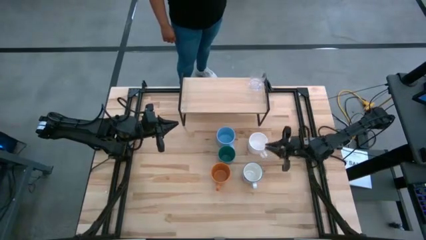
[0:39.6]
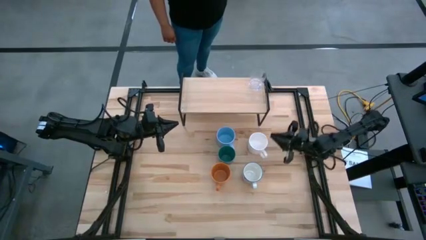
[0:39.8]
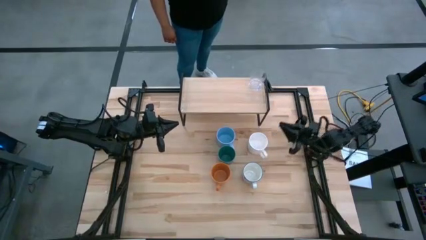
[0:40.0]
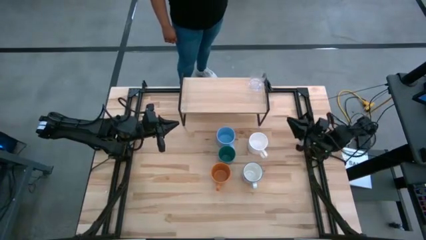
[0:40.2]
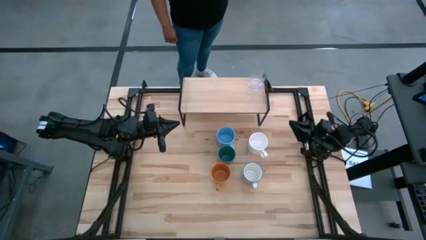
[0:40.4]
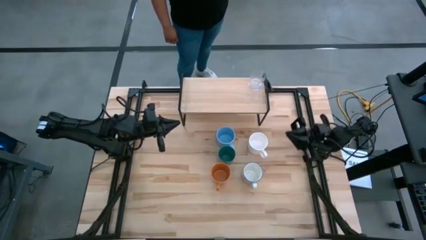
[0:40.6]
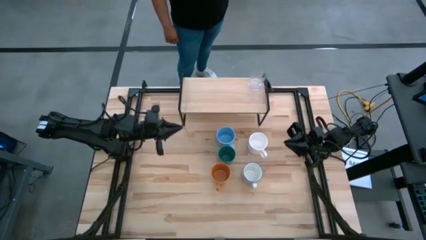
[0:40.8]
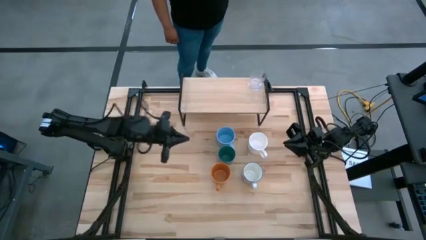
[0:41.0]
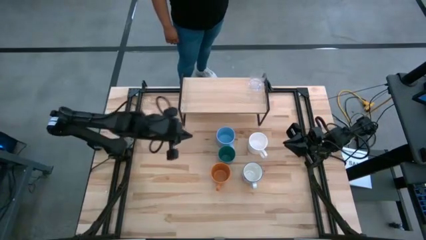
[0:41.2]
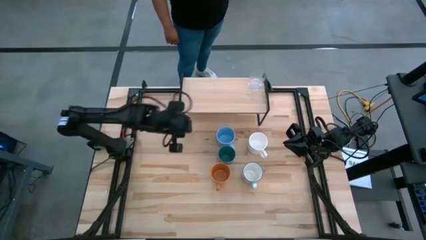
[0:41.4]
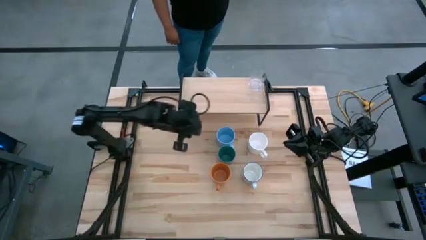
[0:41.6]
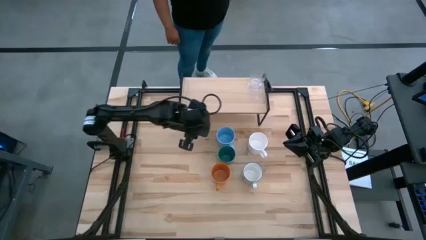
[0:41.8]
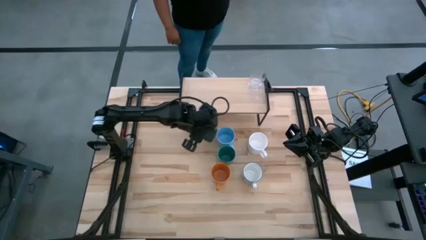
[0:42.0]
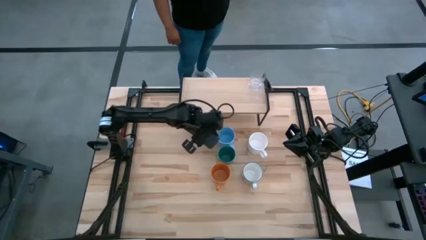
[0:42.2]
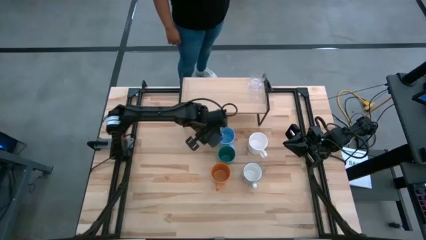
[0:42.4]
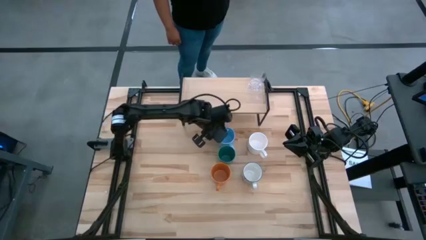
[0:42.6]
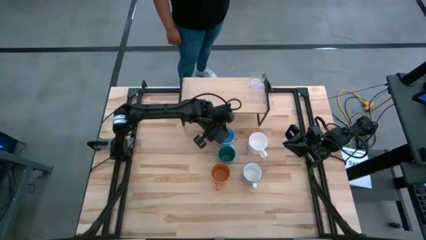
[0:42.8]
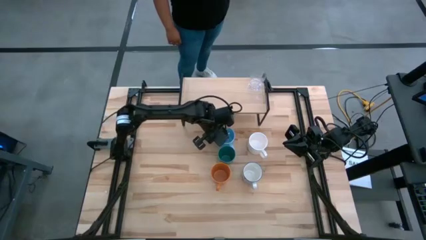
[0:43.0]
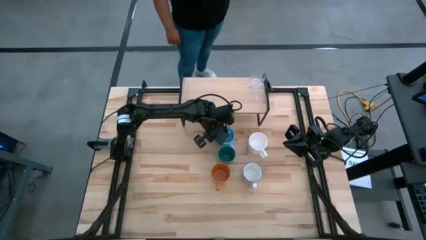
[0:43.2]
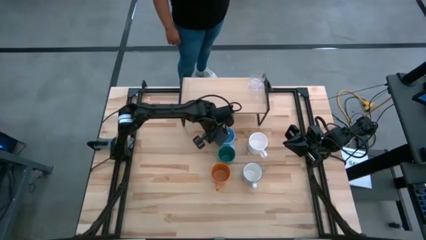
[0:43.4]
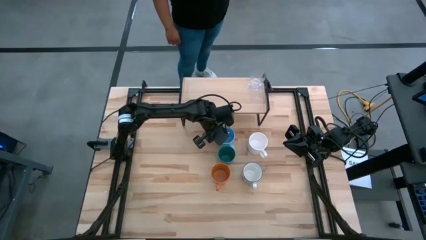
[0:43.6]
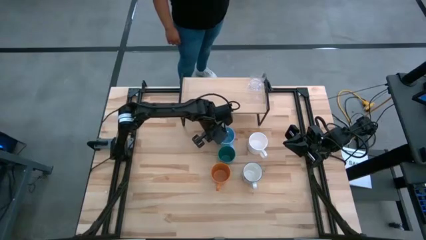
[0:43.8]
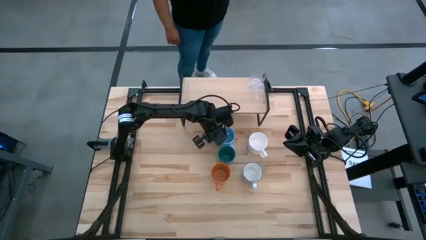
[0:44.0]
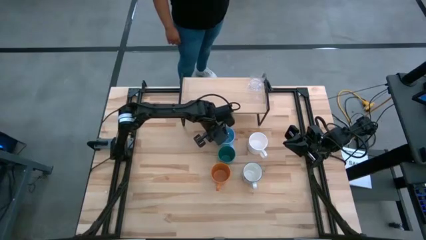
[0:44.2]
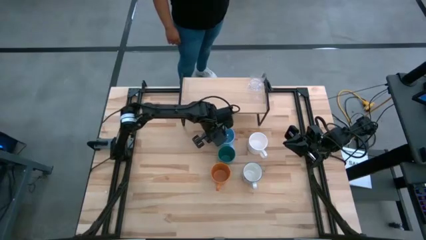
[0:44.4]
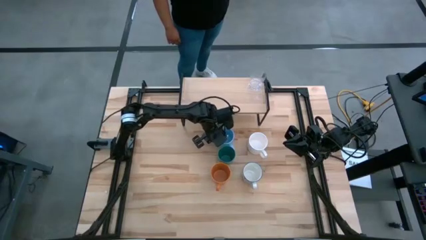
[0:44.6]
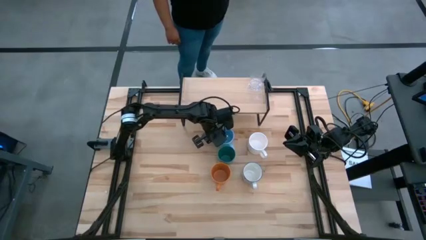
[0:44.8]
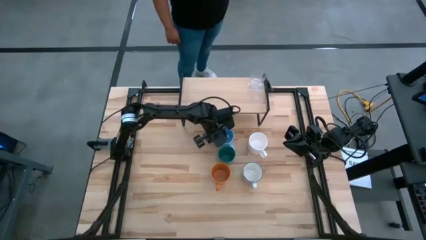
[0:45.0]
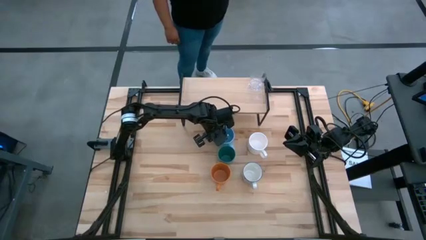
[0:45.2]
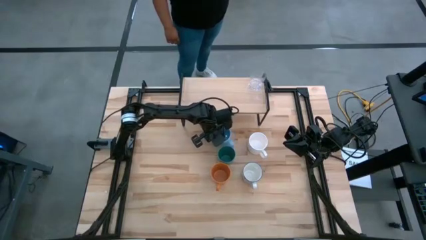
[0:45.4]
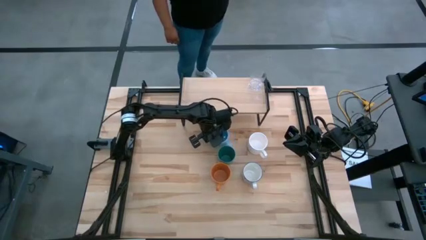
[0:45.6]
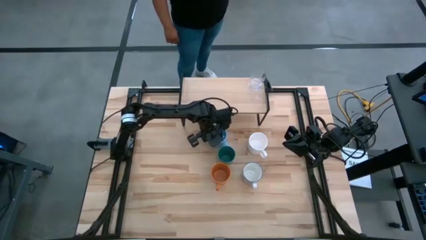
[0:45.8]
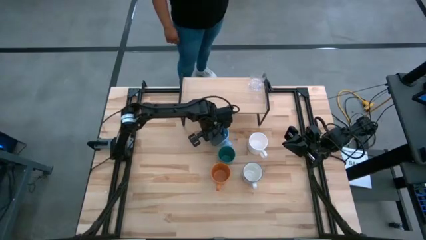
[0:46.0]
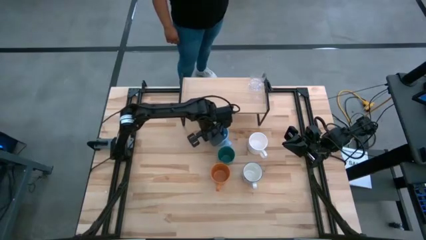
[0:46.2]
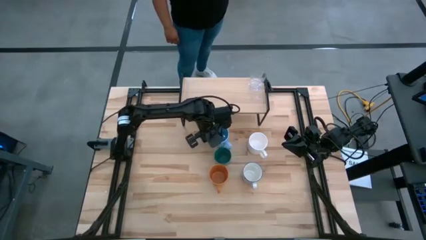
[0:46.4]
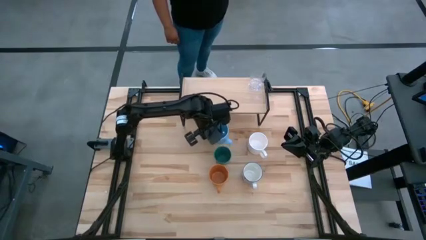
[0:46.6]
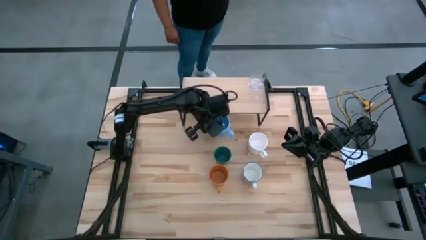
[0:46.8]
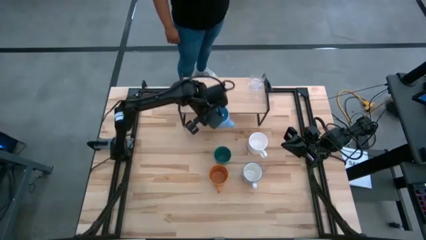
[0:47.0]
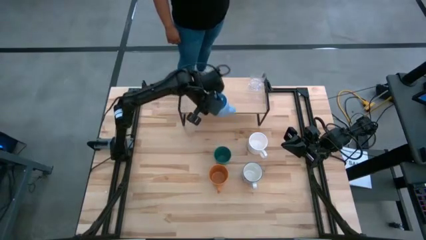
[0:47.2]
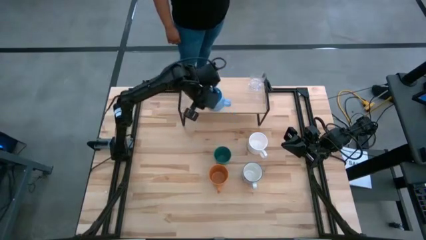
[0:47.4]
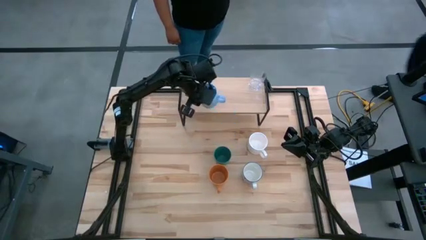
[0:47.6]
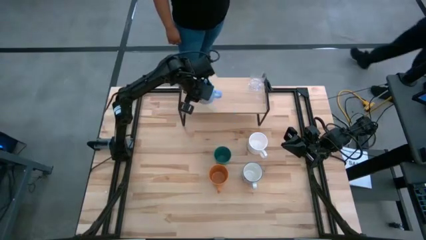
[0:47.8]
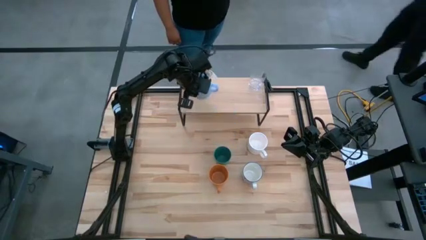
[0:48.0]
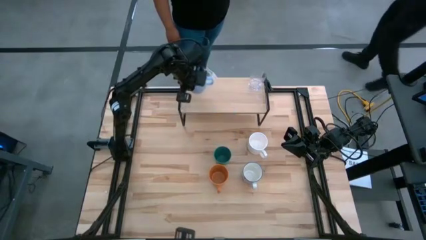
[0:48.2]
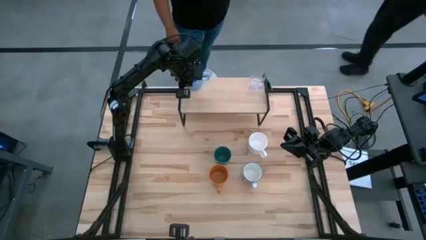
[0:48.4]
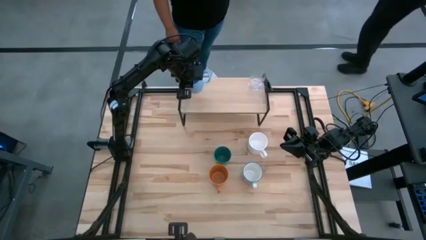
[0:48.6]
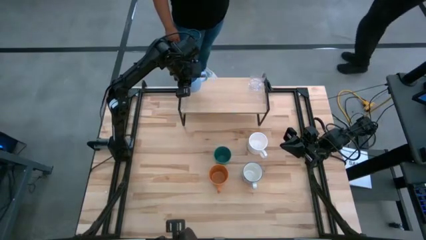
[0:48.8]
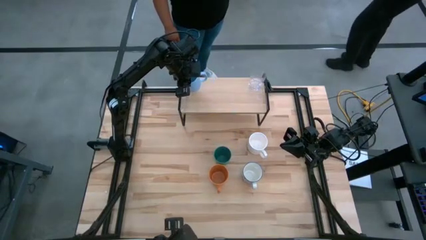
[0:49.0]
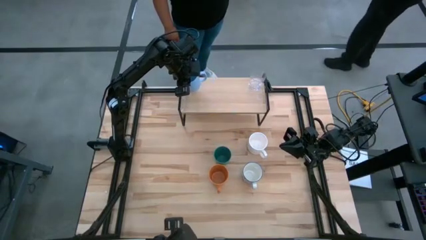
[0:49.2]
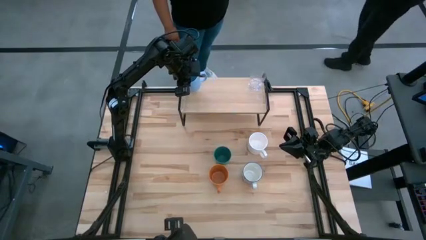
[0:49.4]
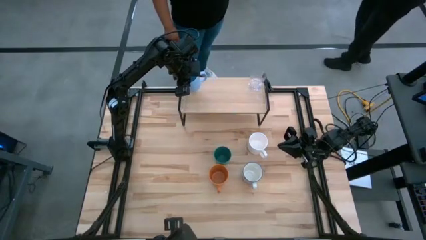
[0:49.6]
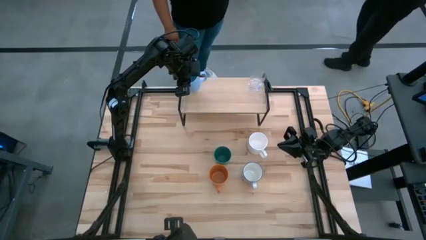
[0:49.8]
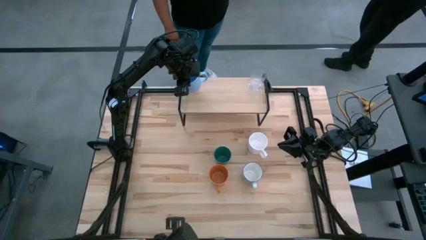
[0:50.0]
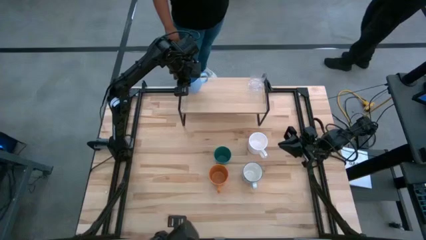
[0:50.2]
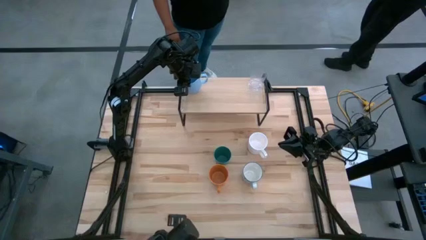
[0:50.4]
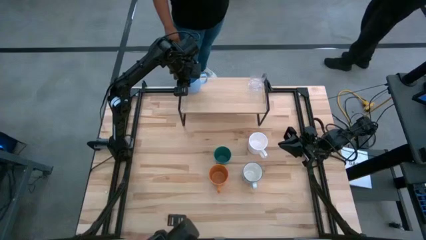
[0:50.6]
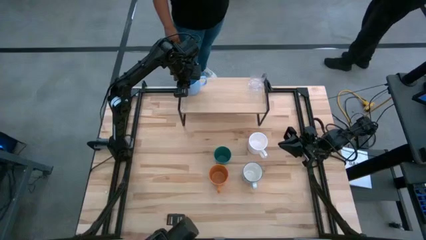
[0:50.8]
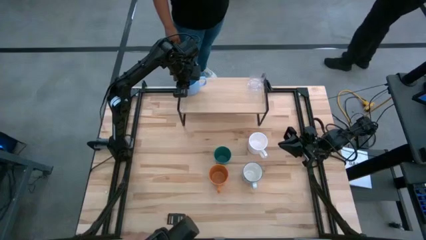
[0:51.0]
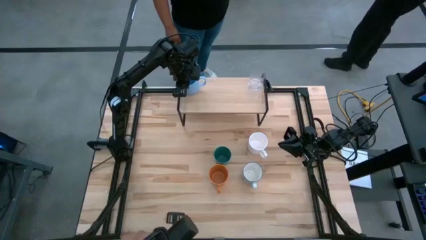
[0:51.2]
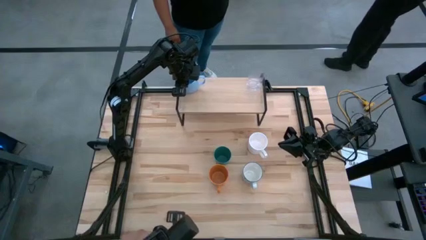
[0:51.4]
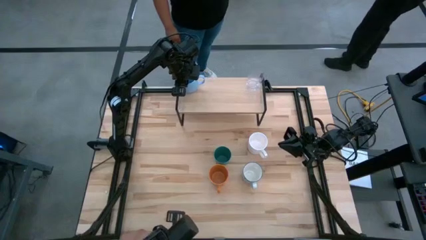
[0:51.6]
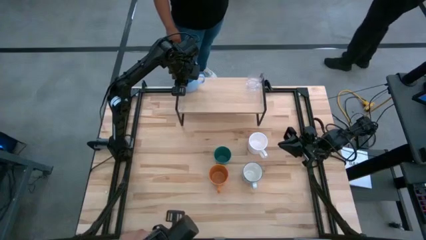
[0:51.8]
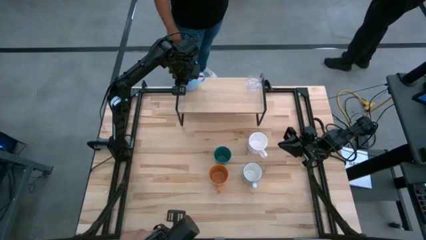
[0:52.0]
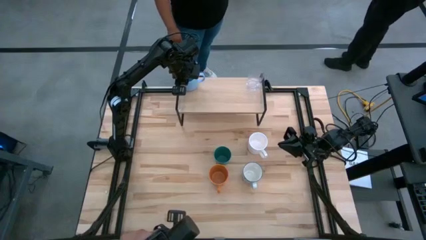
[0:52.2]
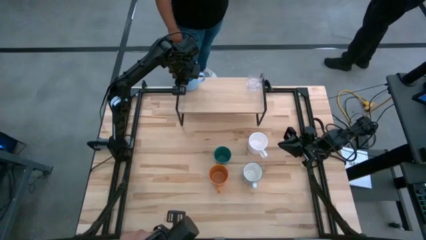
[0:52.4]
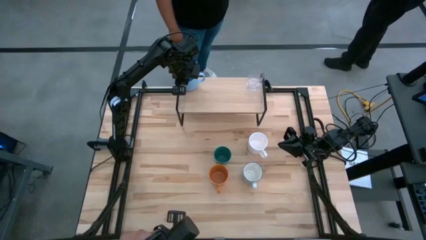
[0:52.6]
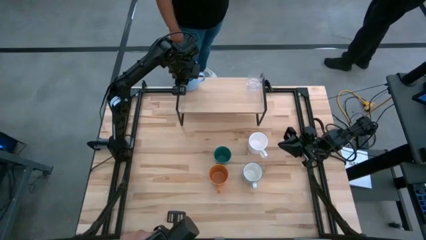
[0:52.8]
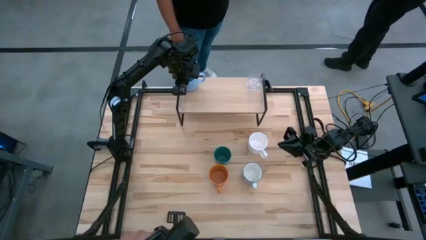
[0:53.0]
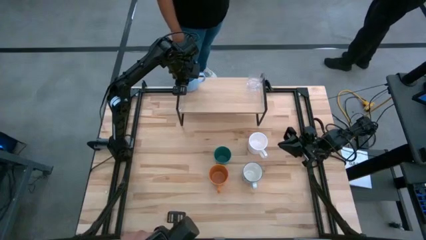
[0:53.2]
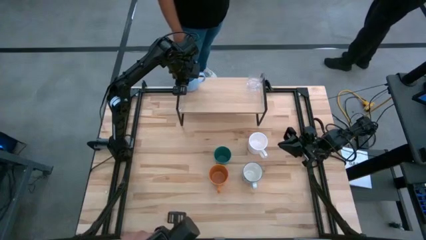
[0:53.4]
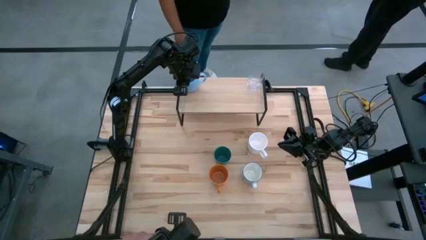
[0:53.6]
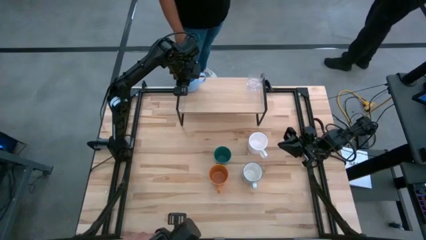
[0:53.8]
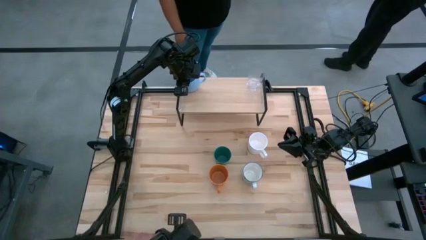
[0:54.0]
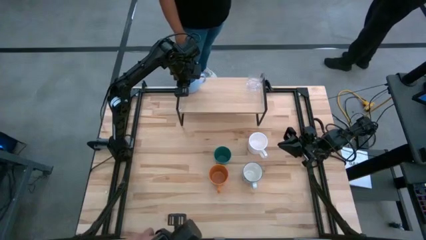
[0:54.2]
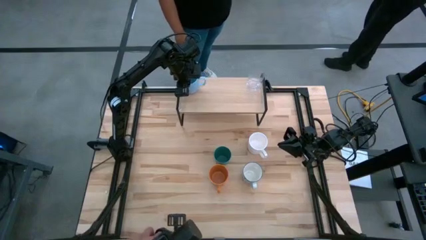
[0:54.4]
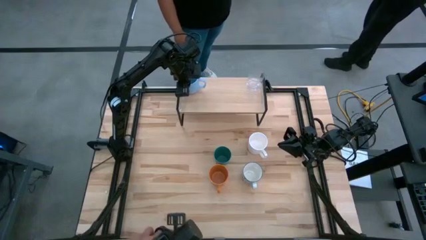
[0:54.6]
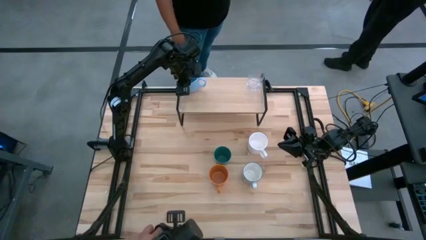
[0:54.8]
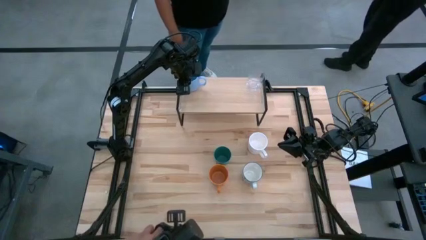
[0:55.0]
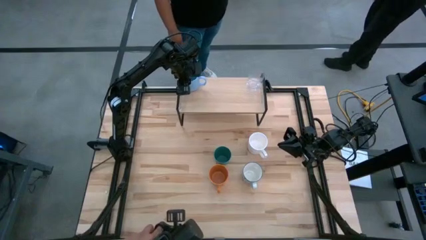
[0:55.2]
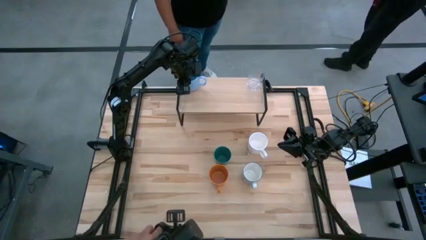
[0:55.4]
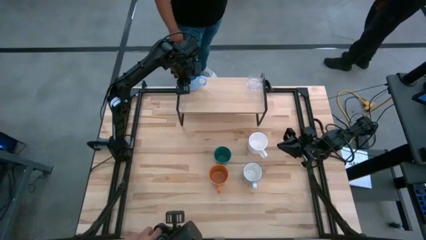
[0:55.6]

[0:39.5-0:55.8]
Task: Stack small to large cups/mugs on shelf
Put the light blue mug on the shelf

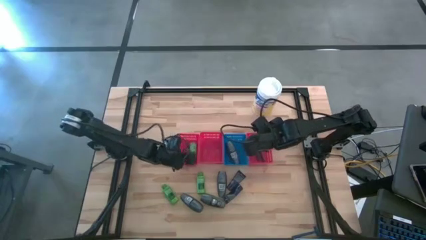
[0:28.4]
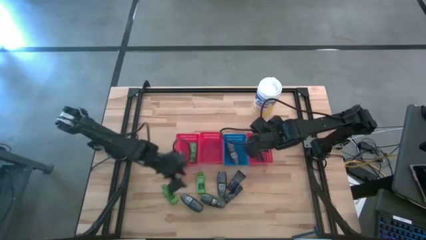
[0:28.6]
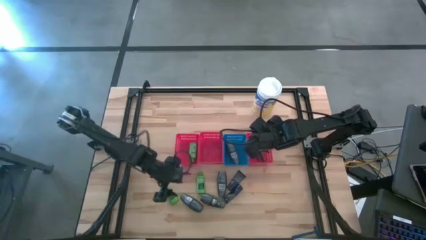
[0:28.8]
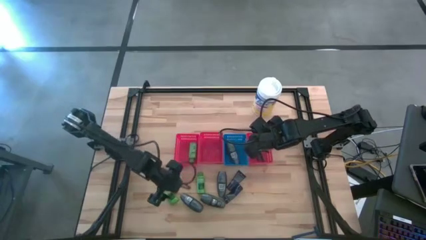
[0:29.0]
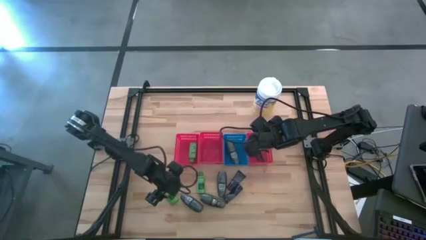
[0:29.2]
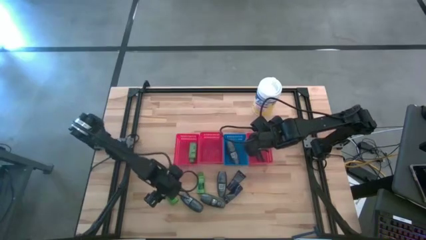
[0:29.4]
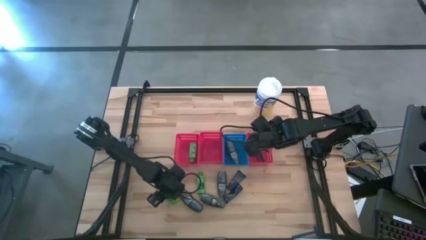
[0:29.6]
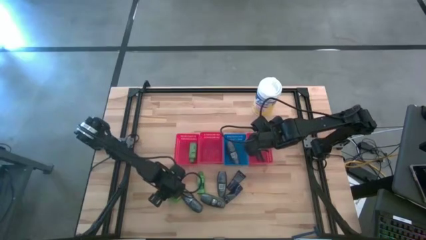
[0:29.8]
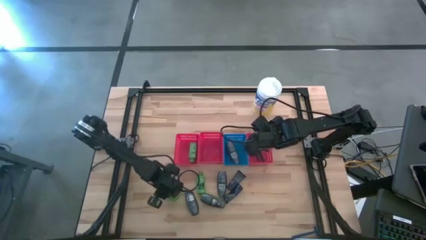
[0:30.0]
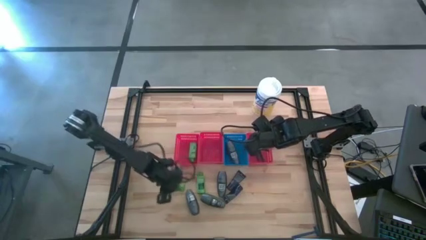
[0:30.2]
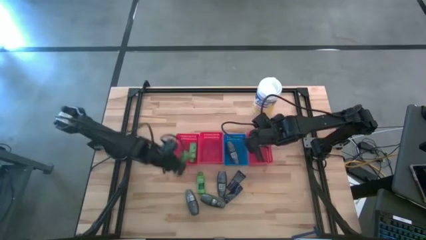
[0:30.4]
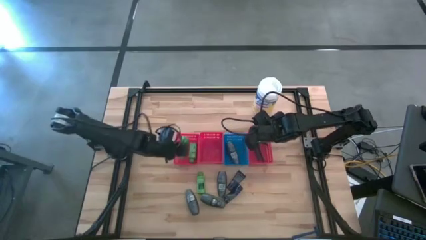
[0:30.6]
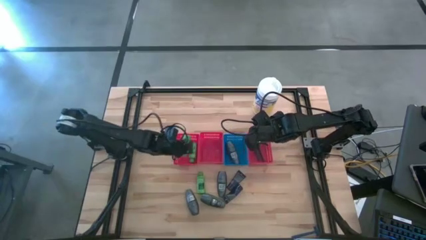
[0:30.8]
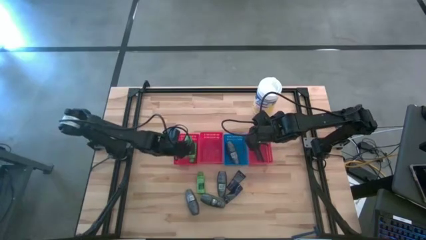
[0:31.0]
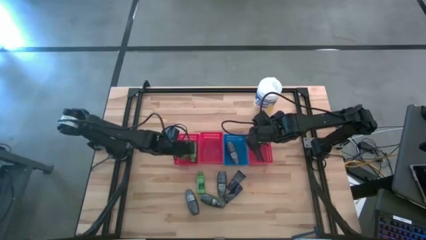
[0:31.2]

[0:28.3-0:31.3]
Task: Pick & Place Travel size toiletries
Put the shampoo into the left red bin
